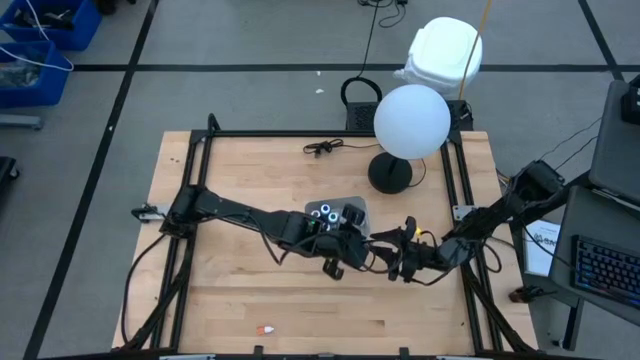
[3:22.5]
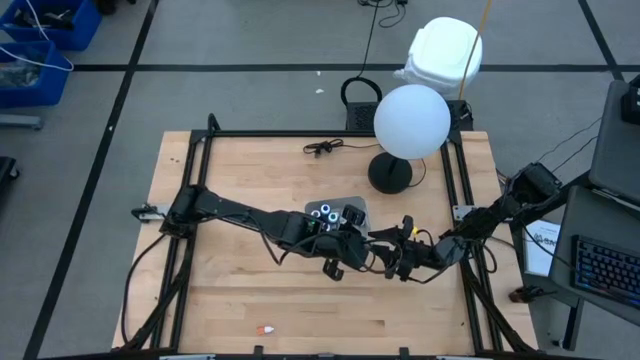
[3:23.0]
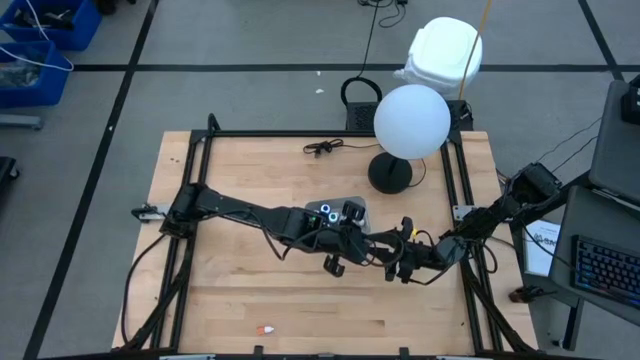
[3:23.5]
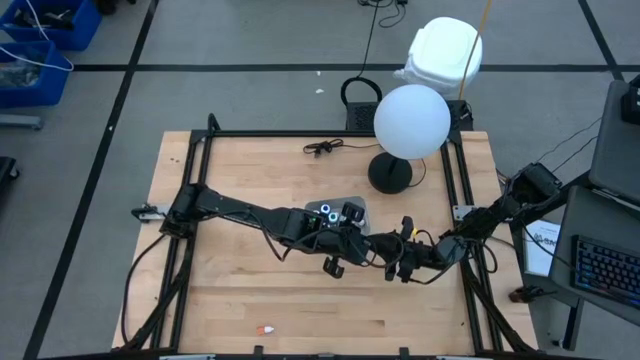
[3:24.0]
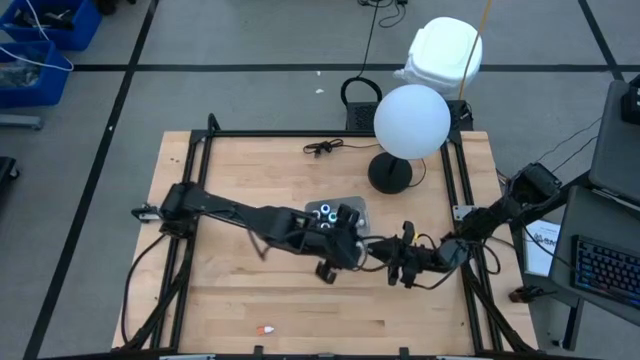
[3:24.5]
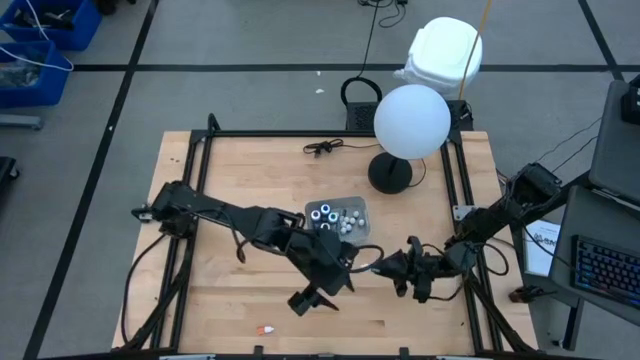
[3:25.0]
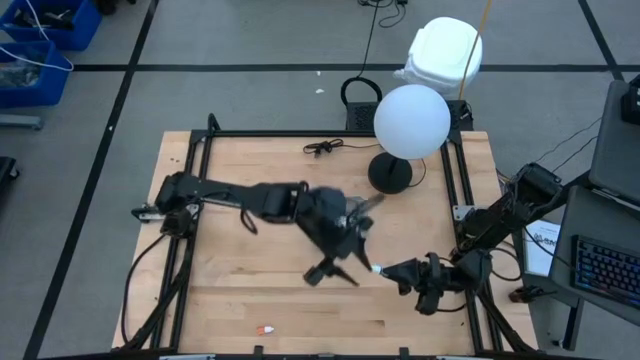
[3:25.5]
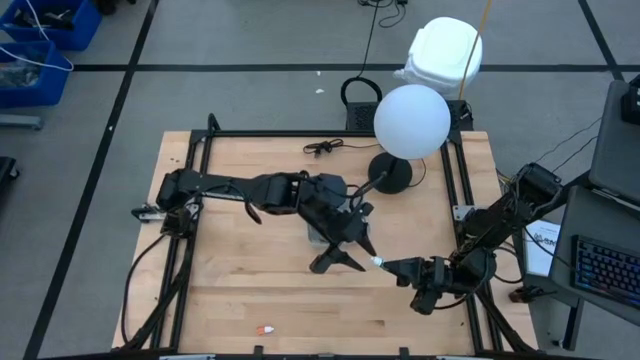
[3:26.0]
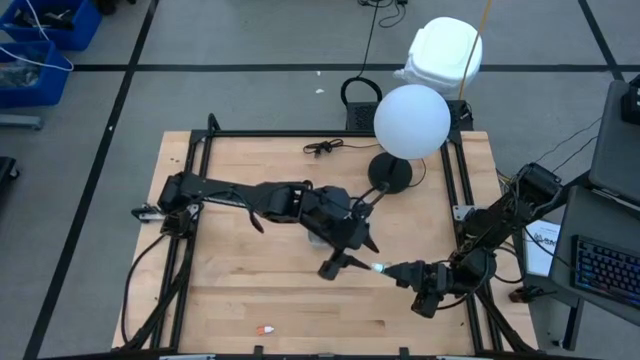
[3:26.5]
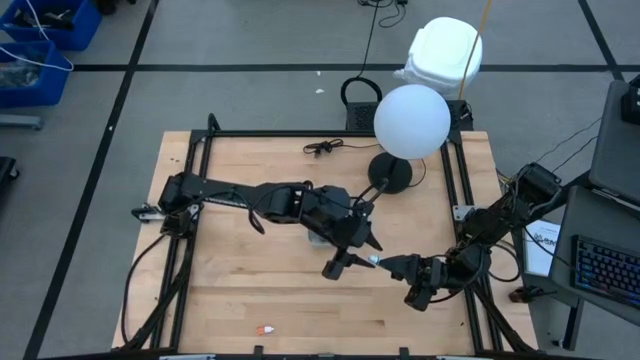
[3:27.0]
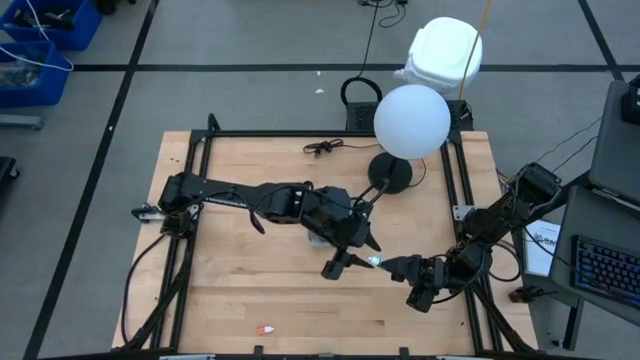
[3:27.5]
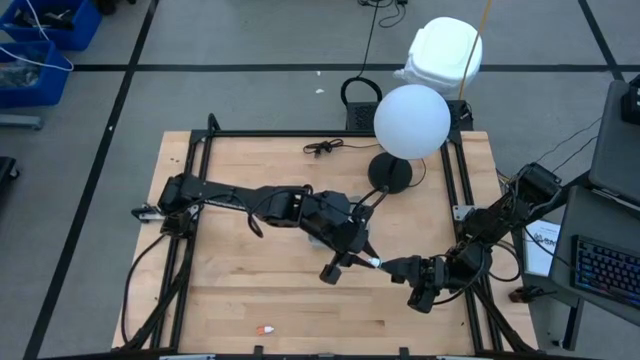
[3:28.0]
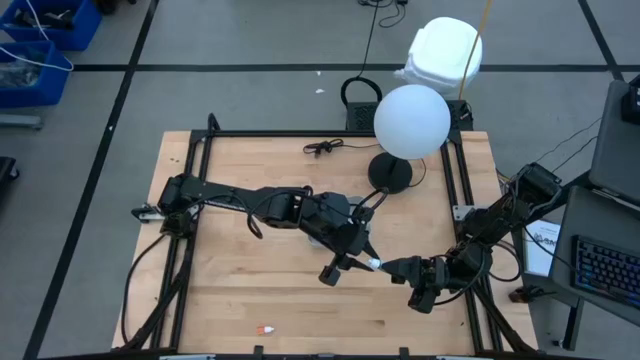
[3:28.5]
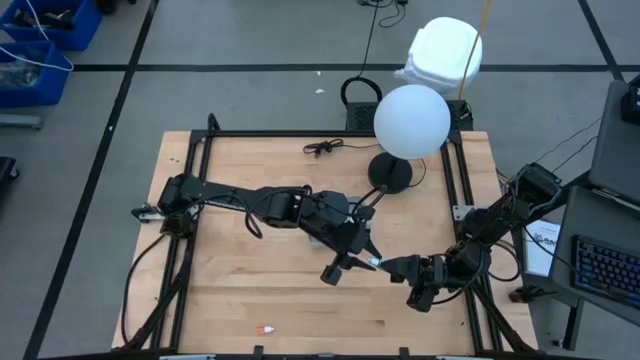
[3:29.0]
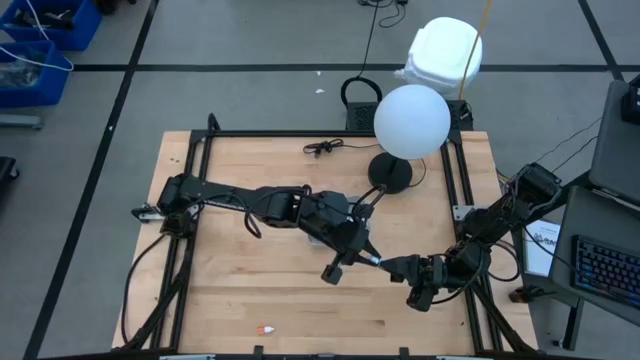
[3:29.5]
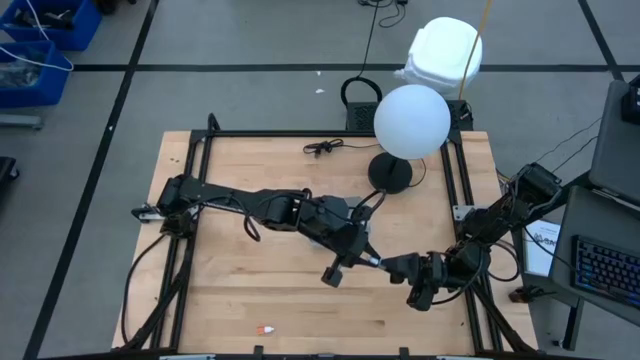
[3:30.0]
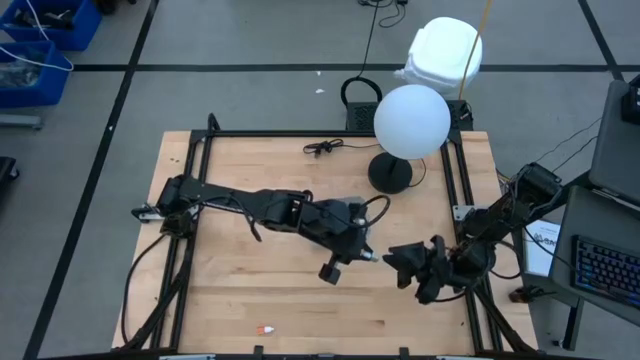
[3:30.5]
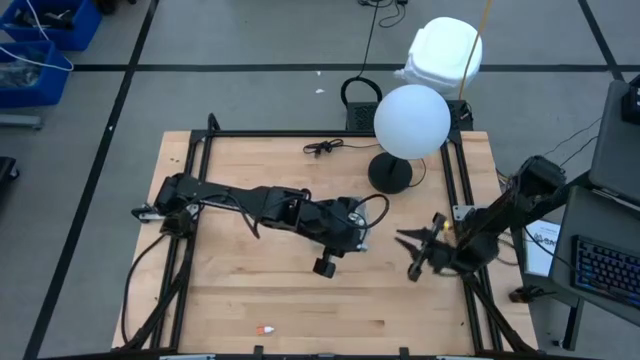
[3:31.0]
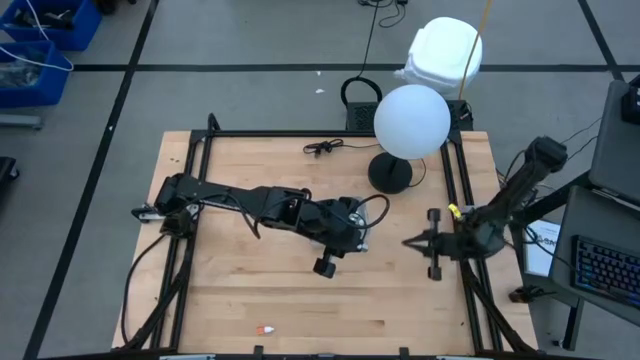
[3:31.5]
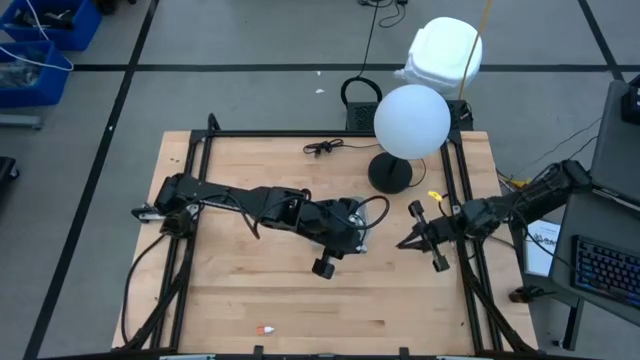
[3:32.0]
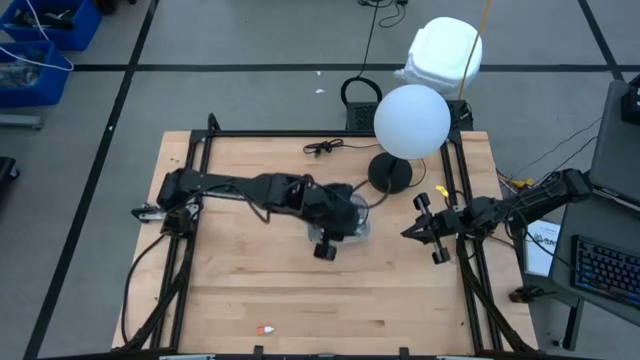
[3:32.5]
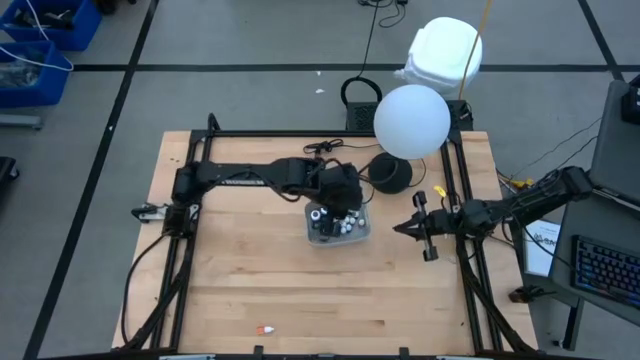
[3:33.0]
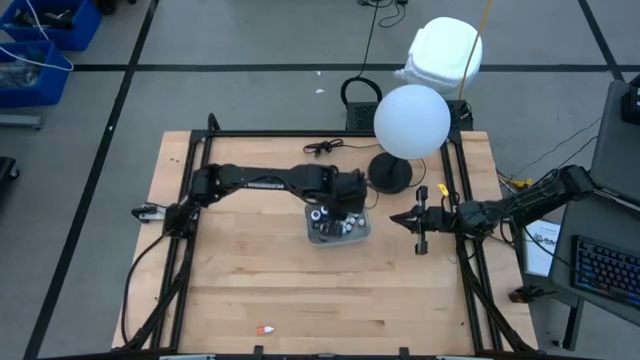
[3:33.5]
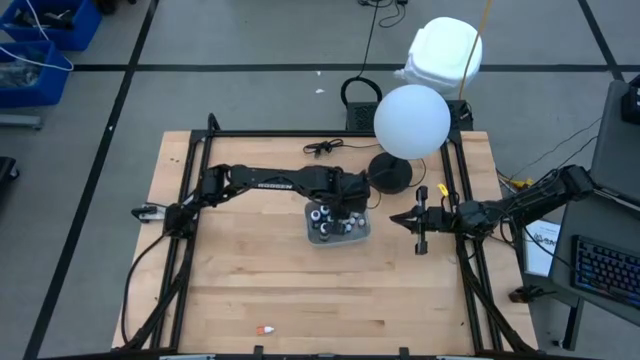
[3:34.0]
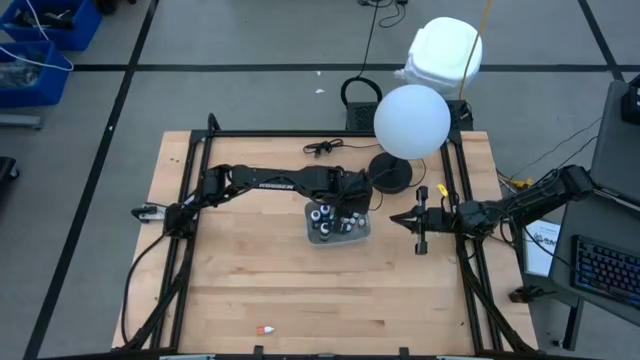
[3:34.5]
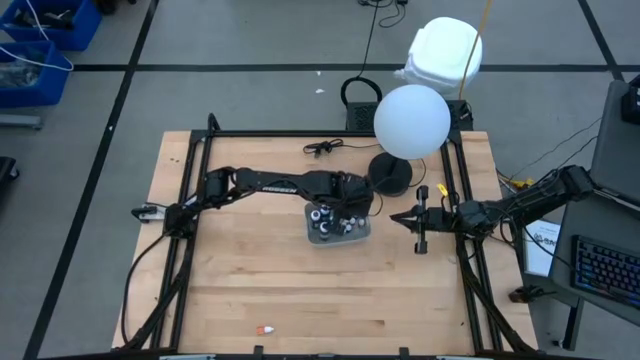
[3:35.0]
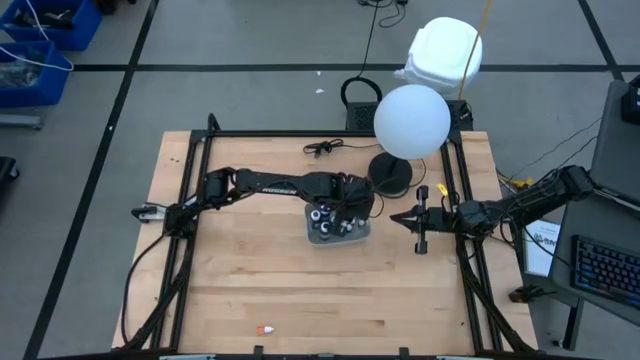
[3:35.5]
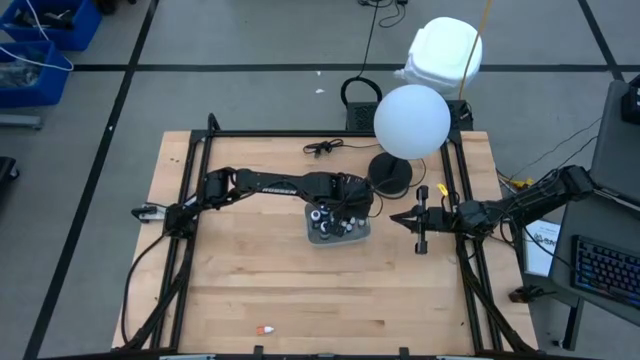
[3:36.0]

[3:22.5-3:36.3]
Task: Pick & Place food coloring
Put the small green food coloring bottle into the gray bin

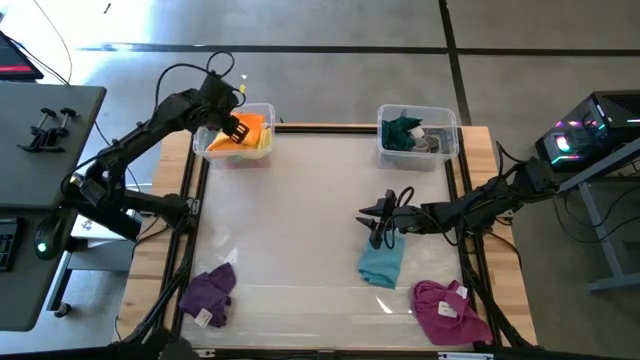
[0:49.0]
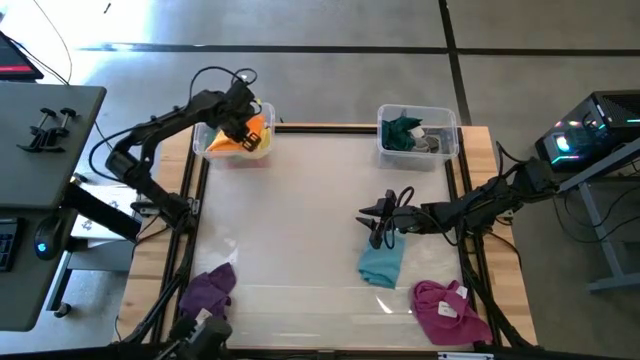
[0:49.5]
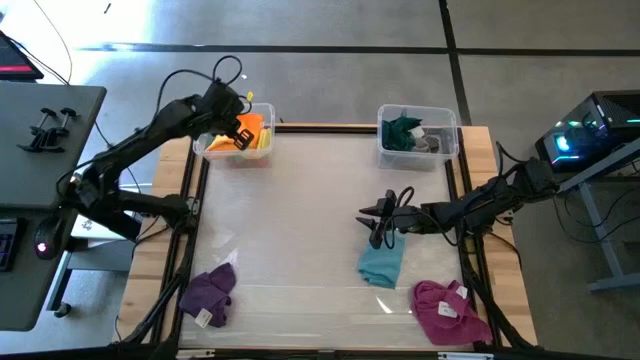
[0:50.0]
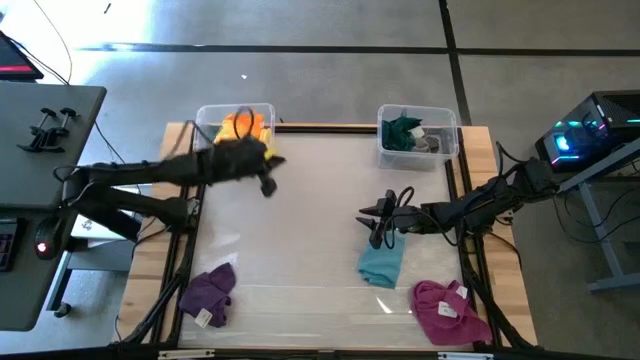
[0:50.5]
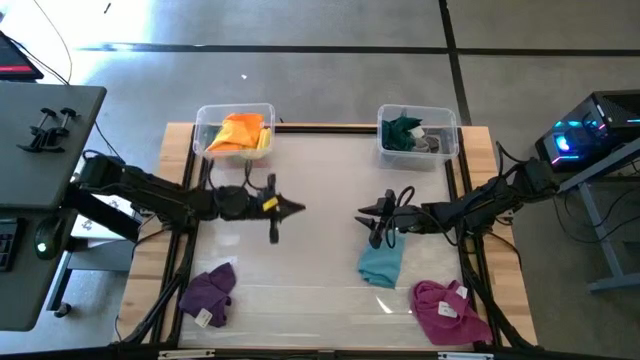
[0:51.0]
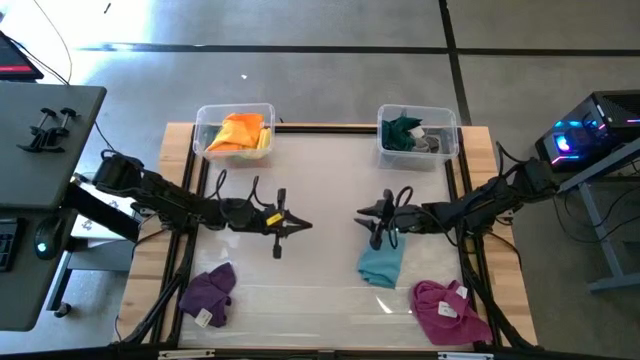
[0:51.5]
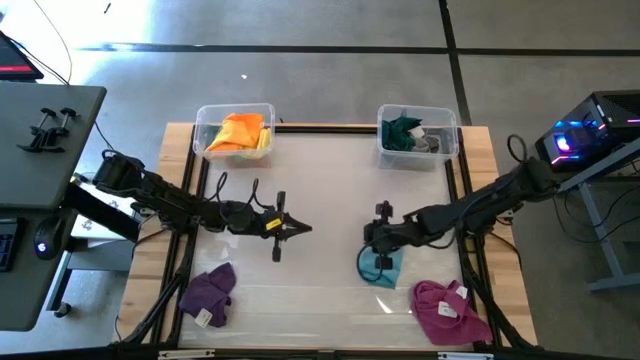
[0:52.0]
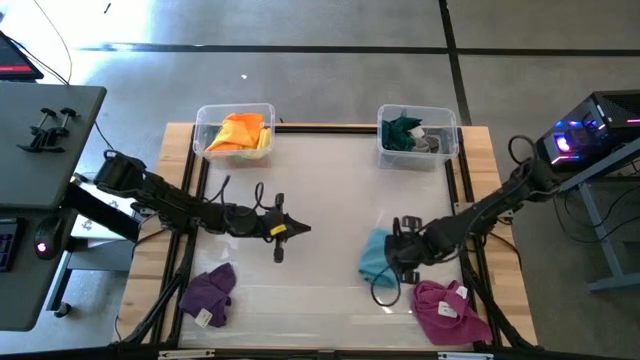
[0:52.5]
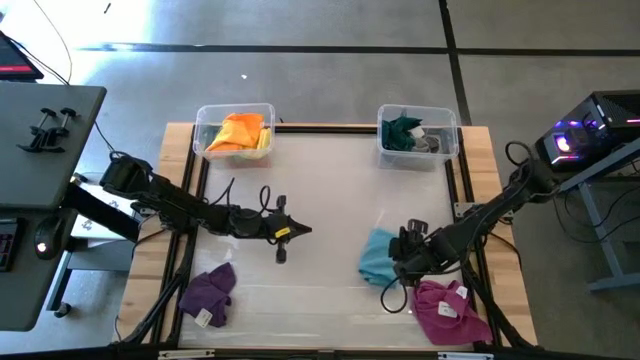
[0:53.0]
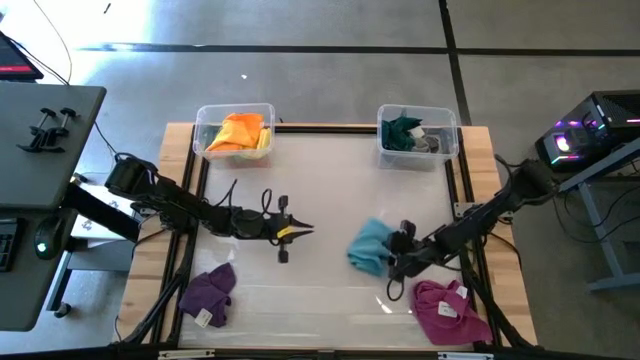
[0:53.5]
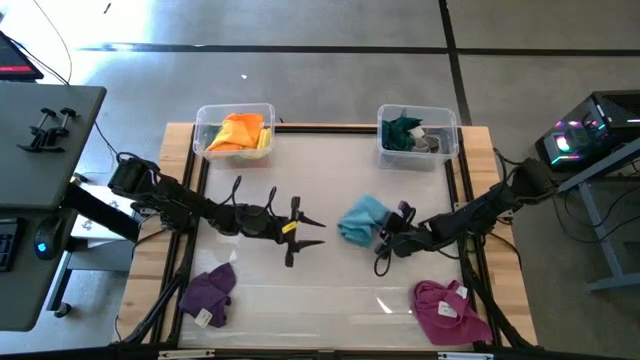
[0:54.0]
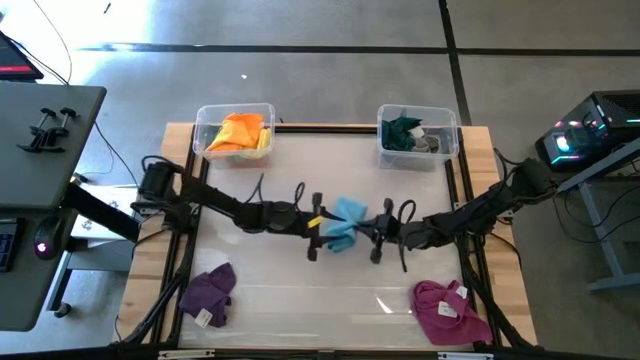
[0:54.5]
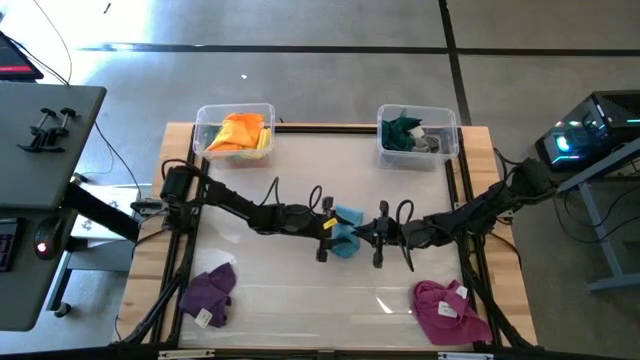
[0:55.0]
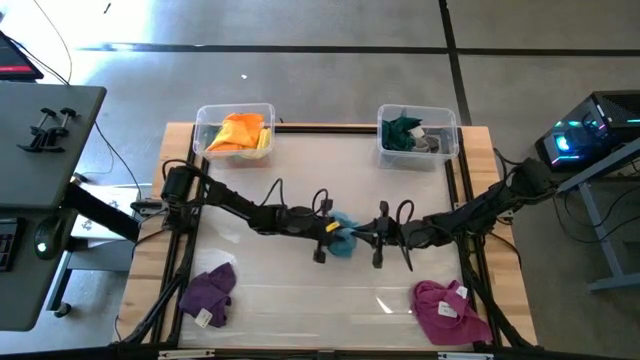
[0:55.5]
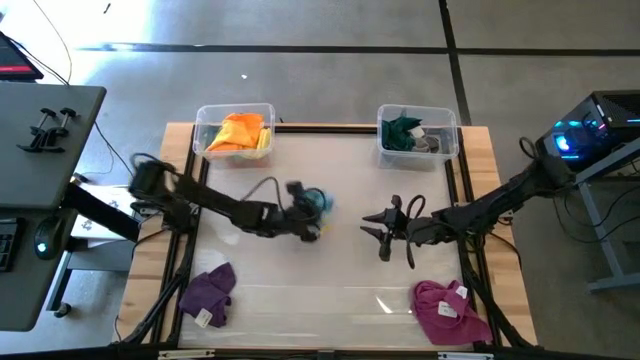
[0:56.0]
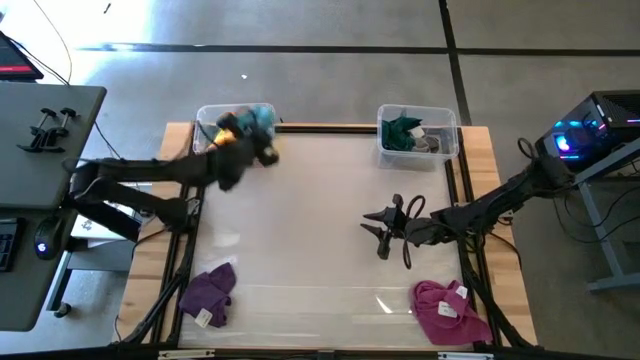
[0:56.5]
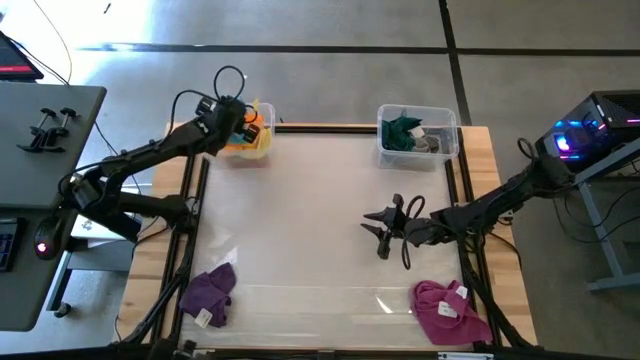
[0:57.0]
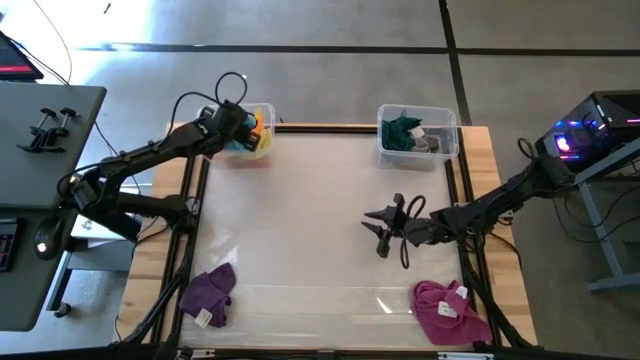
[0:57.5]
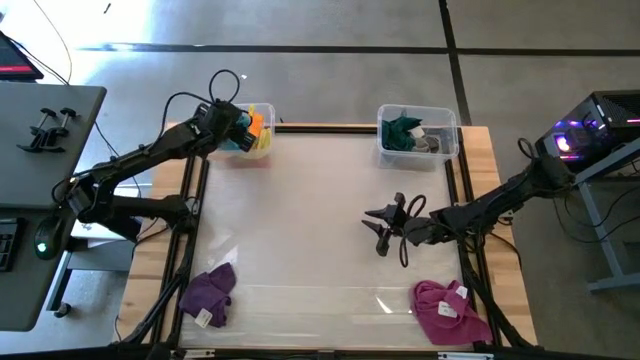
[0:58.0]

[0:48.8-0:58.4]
Task: Sort towels by color in basket
Put the blue microfiber cloth into the left transparent bin
